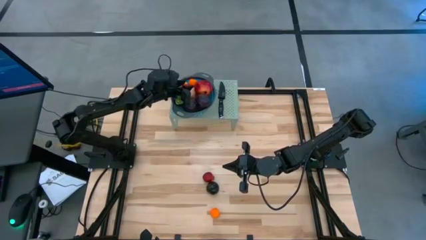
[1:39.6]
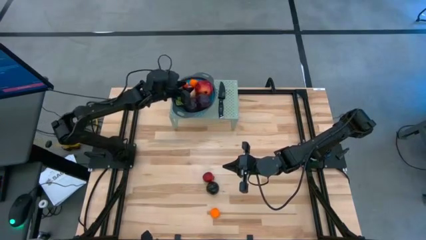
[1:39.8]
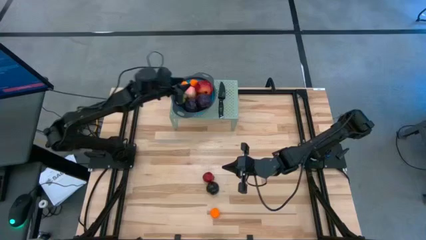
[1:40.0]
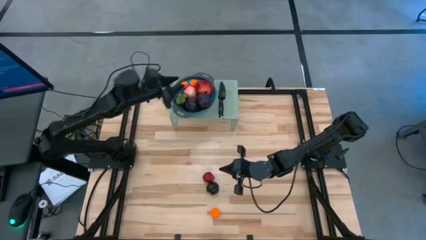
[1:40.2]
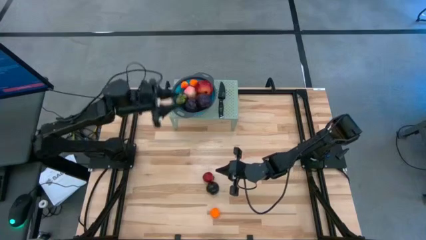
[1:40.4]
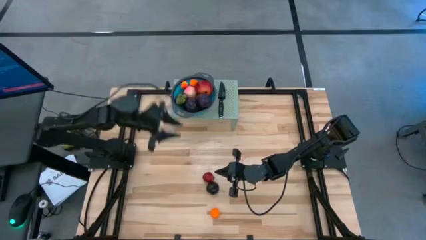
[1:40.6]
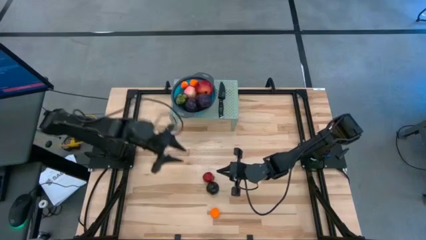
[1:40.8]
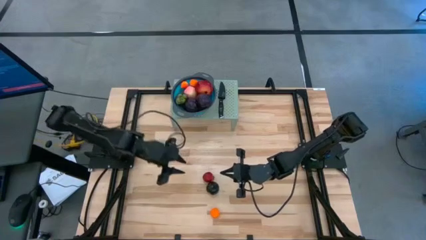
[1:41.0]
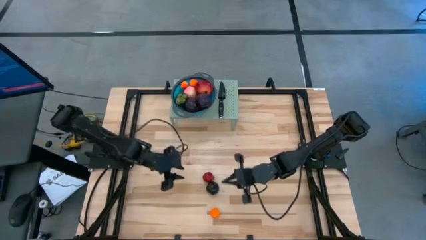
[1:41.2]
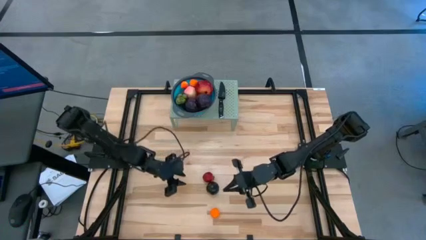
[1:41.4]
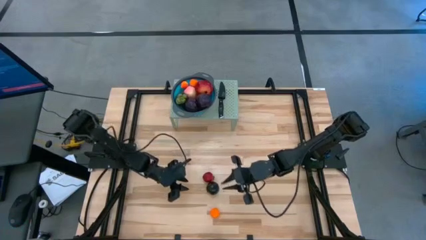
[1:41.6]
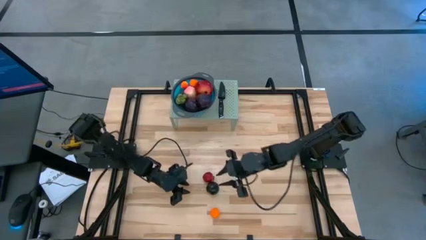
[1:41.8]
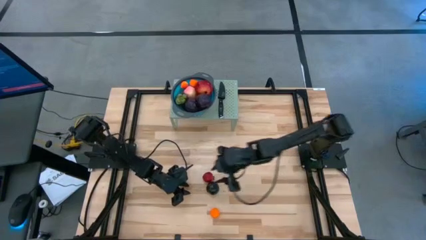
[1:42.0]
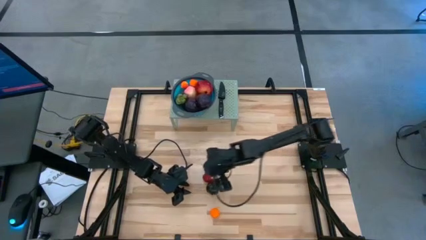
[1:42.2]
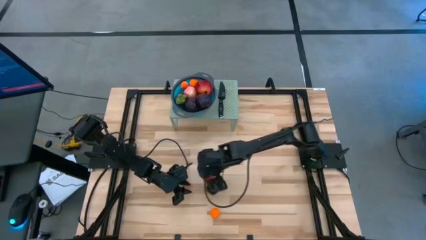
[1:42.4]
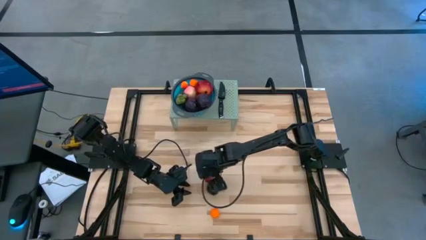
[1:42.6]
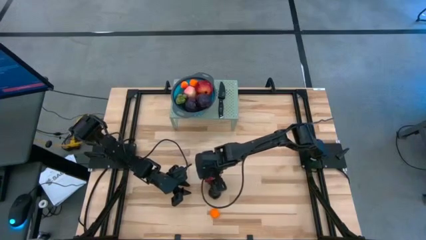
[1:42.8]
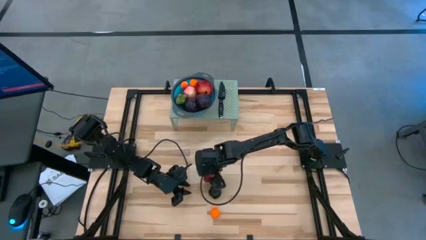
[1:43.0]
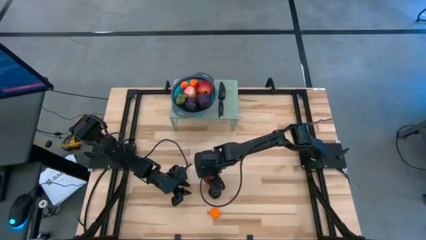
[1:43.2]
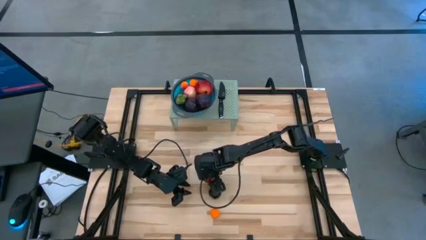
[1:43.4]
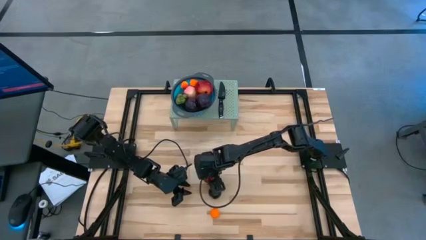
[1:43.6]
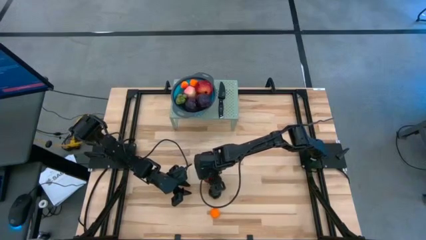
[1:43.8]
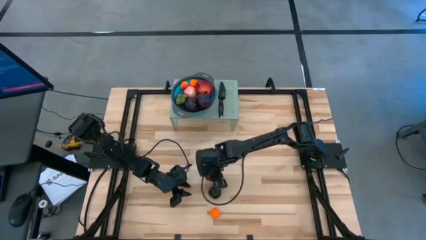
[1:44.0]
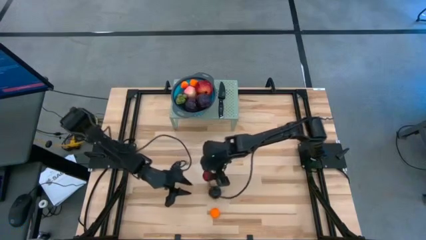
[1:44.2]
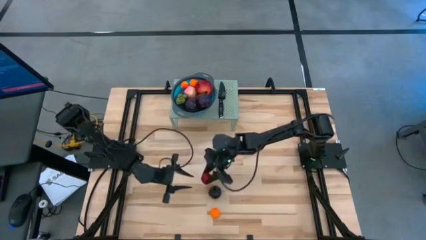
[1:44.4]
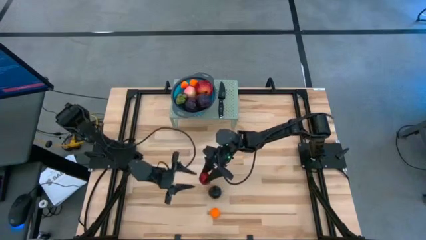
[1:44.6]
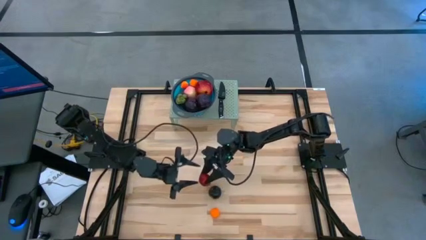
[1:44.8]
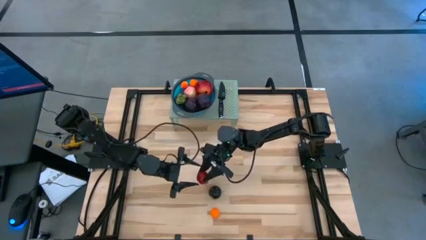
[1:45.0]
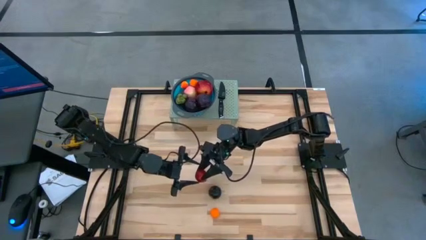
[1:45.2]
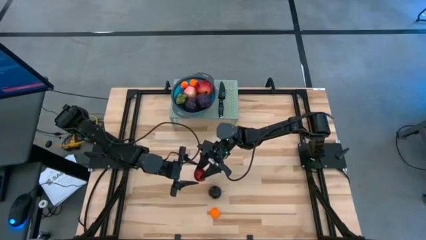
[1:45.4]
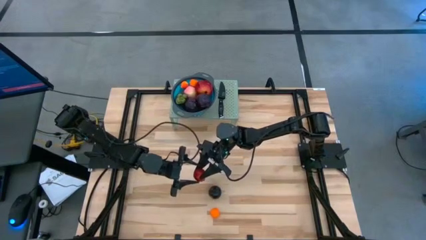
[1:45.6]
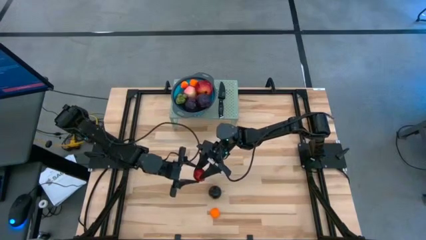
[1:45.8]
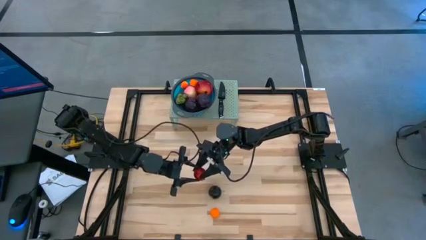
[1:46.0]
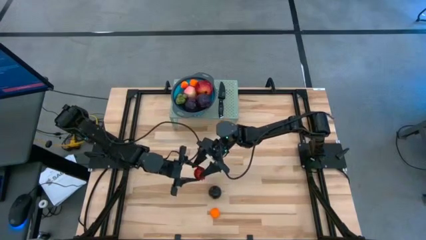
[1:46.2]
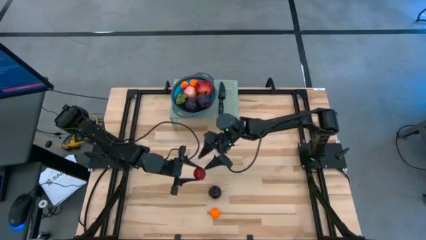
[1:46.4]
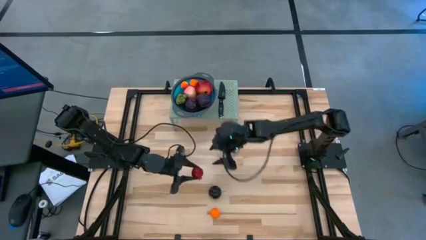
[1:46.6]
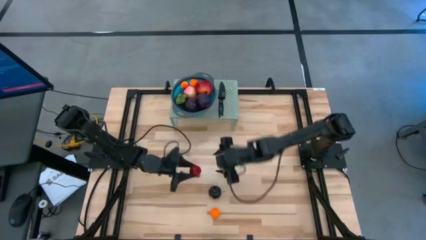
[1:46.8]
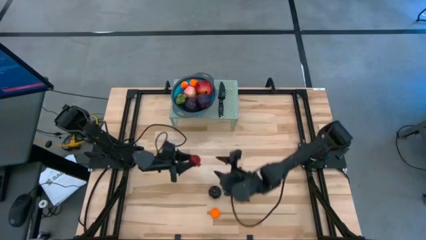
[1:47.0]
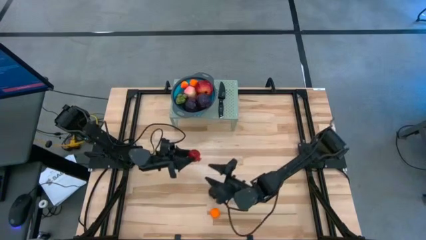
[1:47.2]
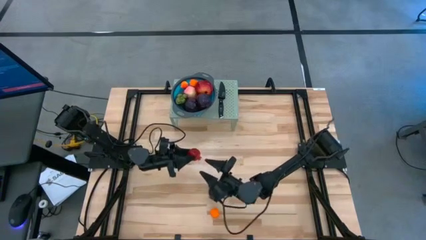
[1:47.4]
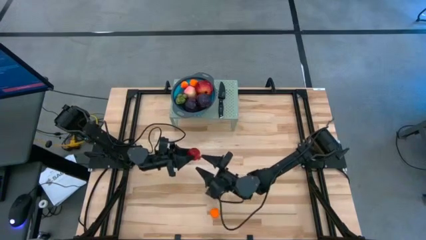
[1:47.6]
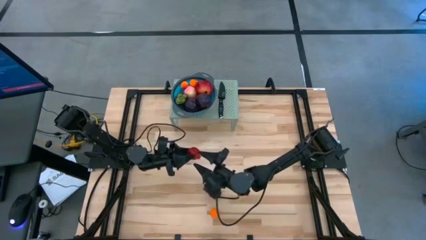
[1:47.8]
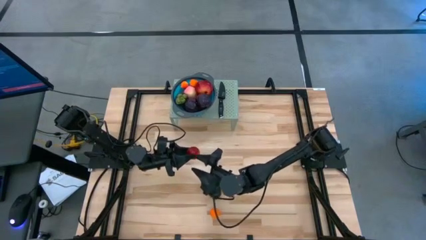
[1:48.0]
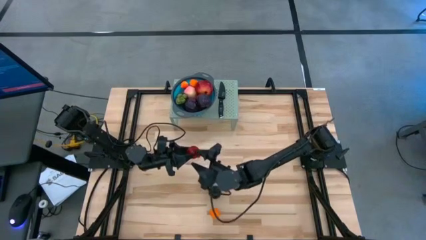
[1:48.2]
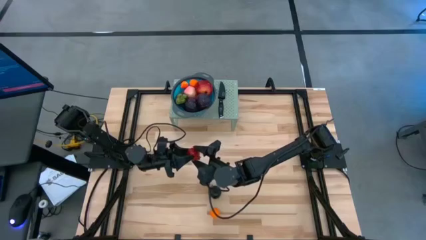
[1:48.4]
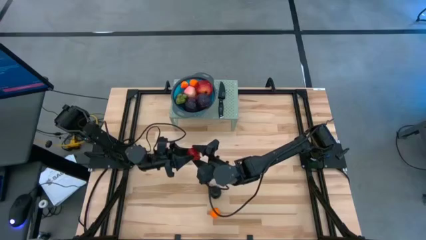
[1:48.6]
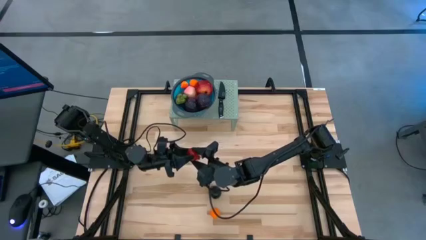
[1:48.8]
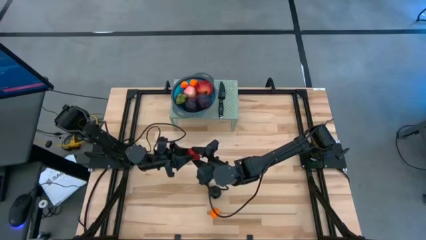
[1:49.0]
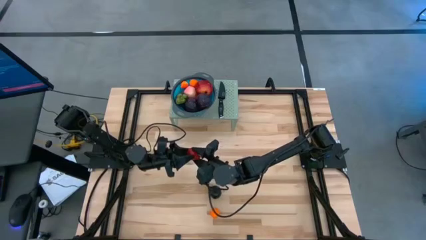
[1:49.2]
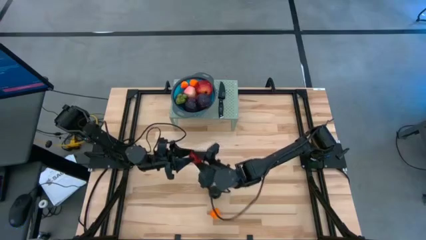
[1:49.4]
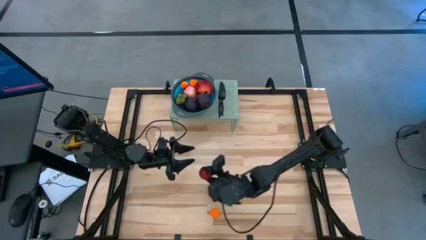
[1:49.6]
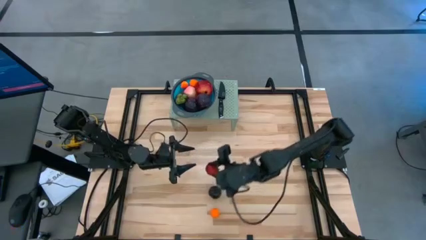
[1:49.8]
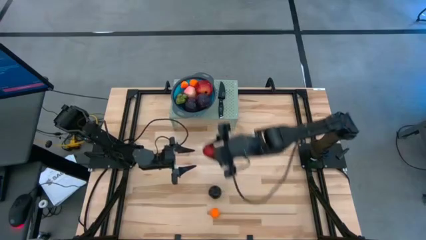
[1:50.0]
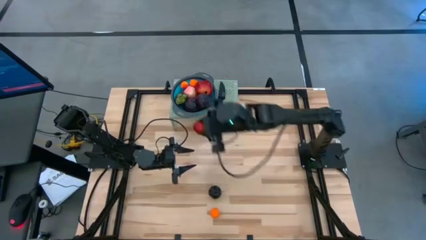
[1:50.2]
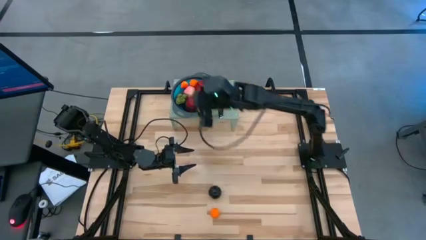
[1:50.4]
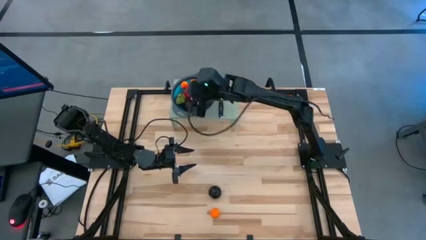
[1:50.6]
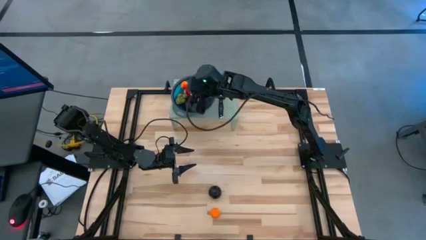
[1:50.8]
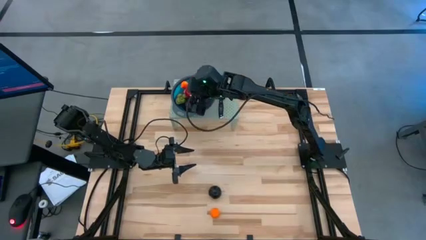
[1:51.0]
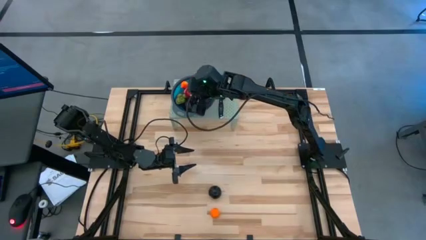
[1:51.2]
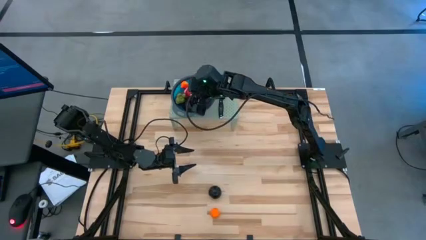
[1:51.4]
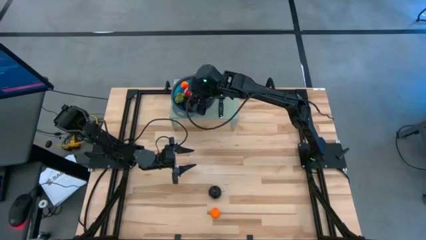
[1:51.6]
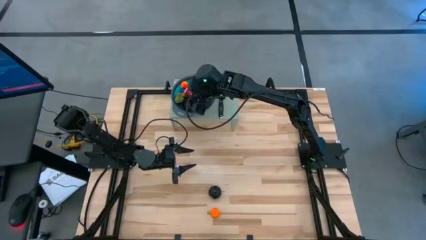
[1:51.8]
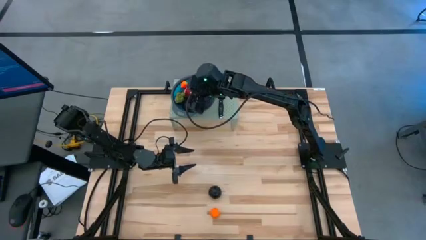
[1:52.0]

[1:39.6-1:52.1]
Task: Pick & Place Fruit
Put the red pomegranate into the blue strainer bowl

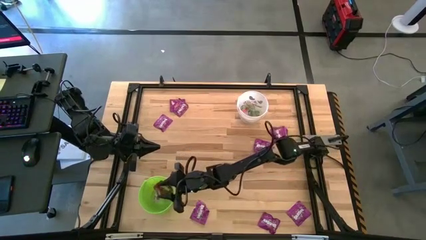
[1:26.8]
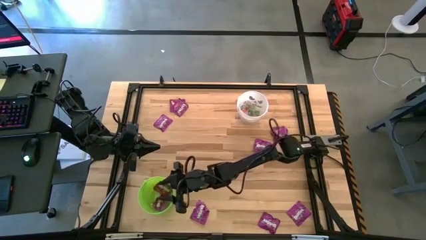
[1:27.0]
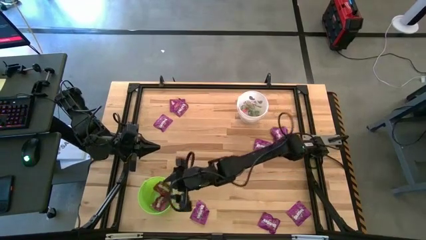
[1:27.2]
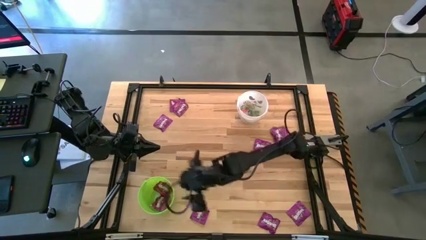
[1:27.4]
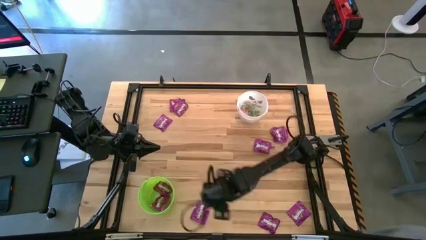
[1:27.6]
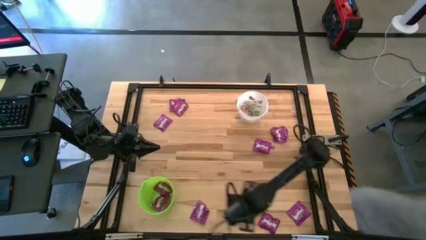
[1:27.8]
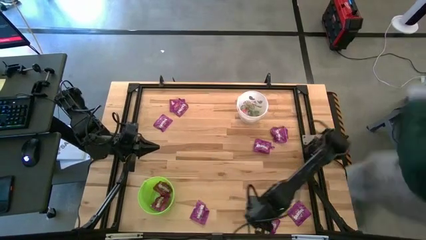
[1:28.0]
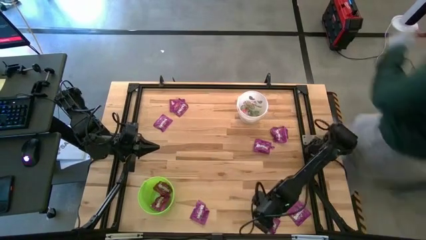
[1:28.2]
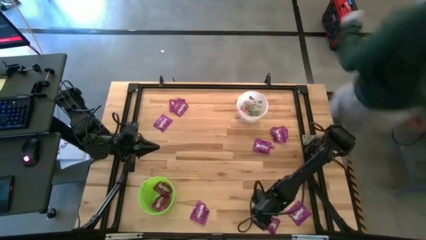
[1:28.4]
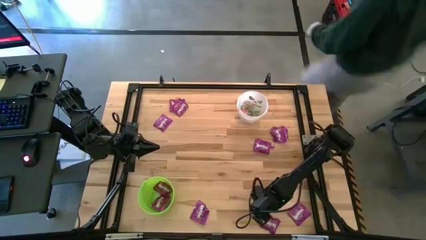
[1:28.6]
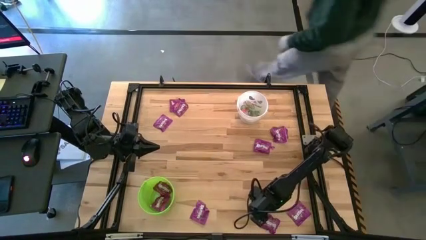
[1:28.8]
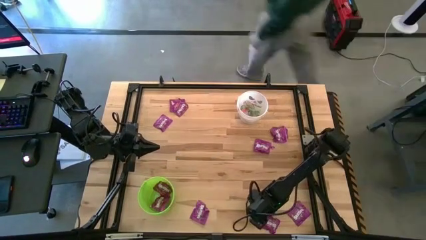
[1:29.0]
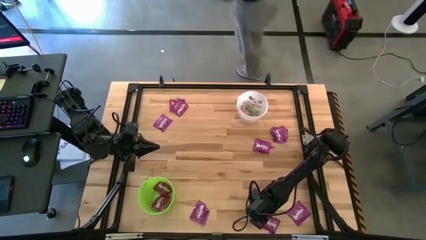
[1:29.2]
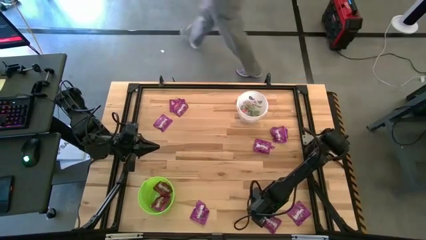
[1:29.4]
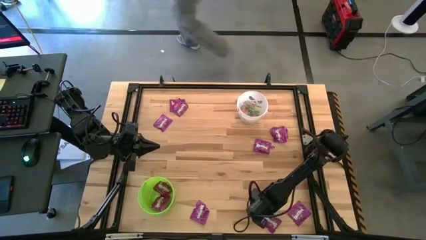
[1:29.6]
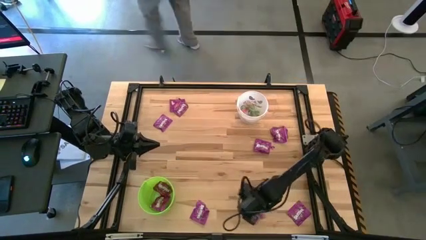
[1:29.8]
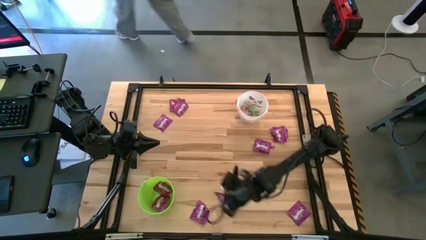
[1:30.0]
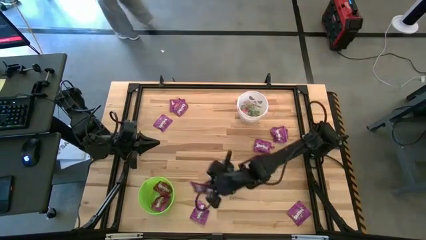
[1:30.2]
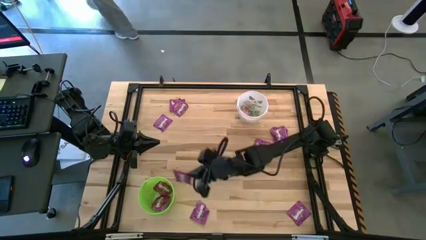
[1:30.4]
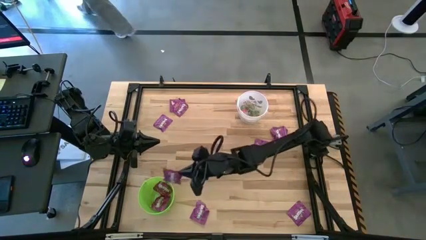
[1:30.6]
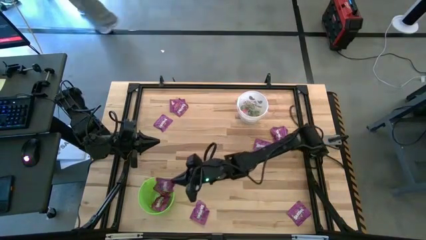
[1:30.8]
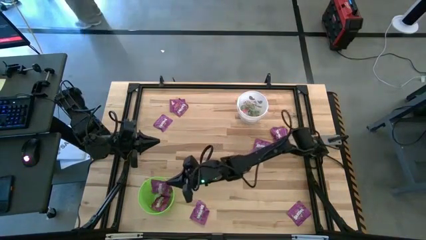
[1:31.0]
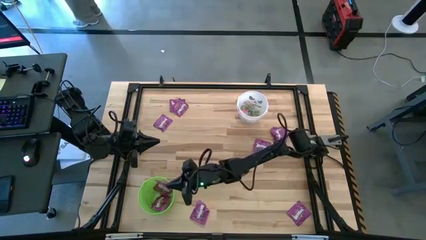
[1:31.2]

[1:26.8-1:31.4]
Task: Sort candy by brand, put in halloween buckets
Put the purple candy into the green bucket
